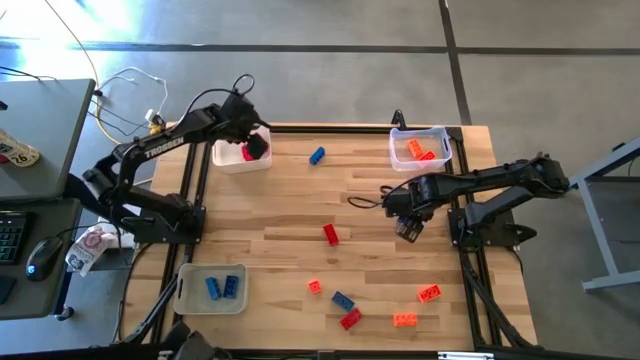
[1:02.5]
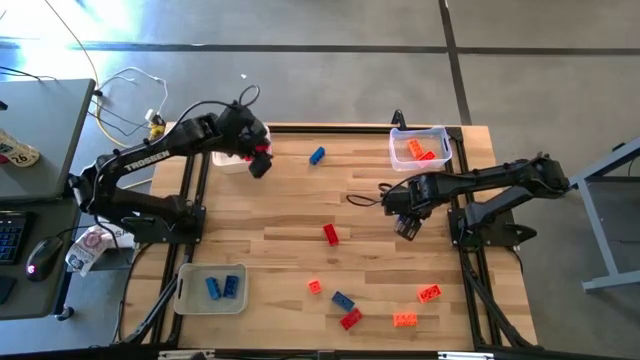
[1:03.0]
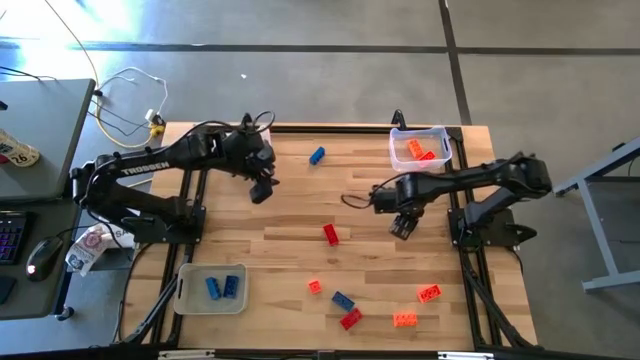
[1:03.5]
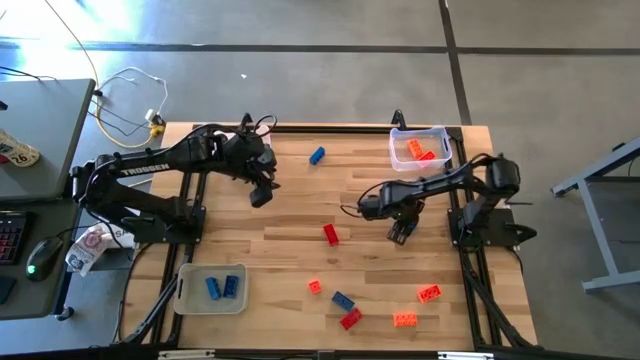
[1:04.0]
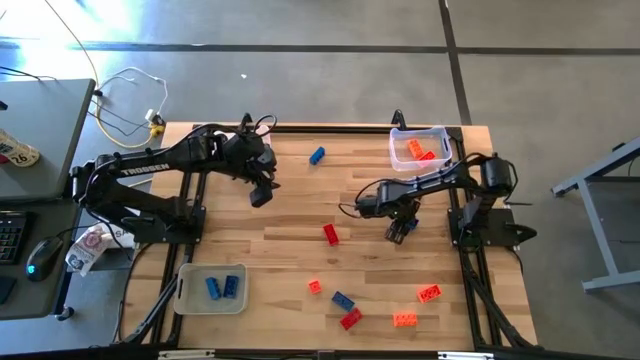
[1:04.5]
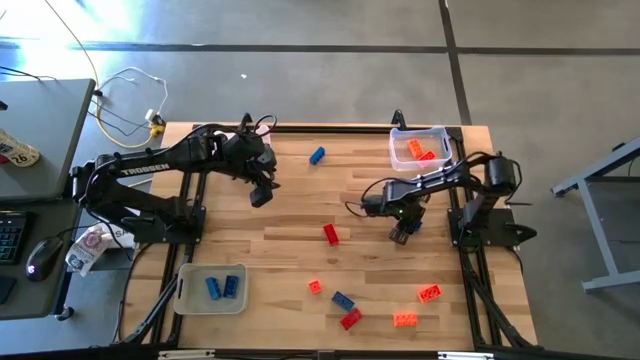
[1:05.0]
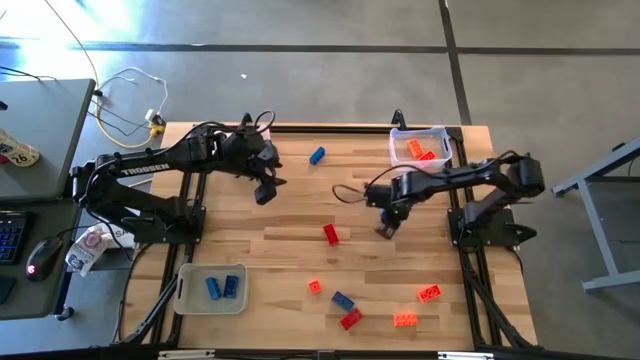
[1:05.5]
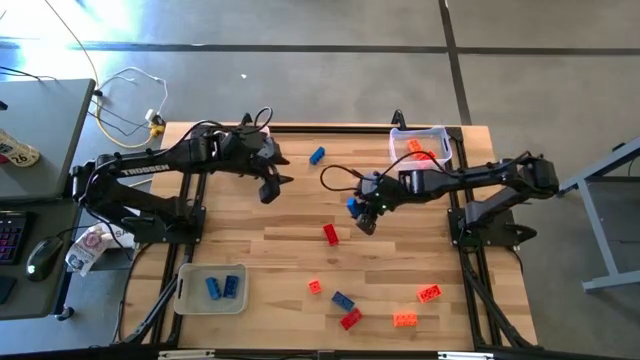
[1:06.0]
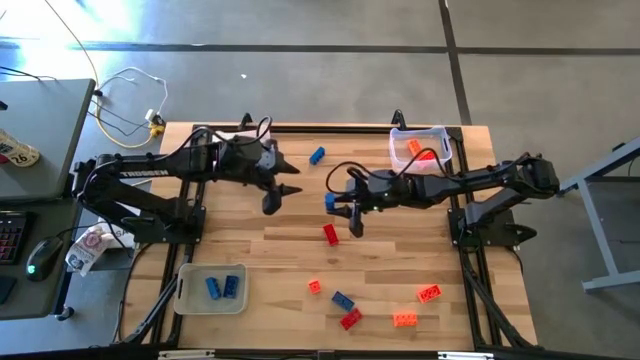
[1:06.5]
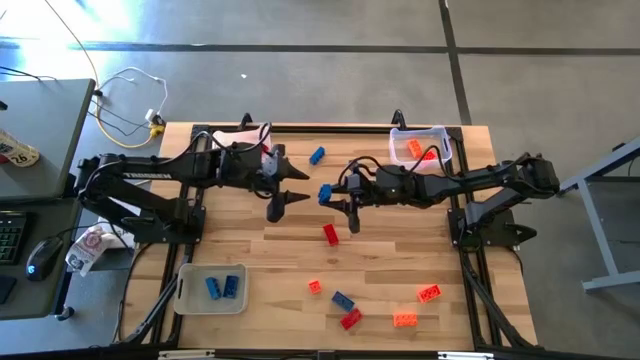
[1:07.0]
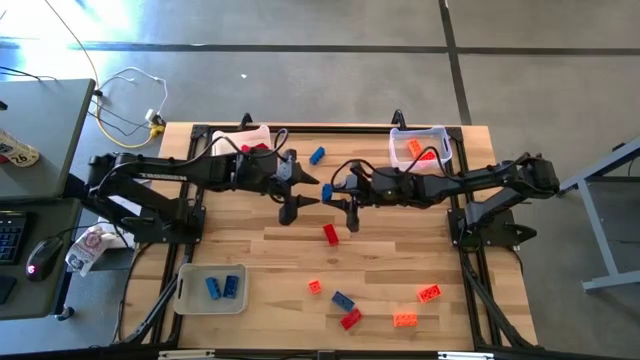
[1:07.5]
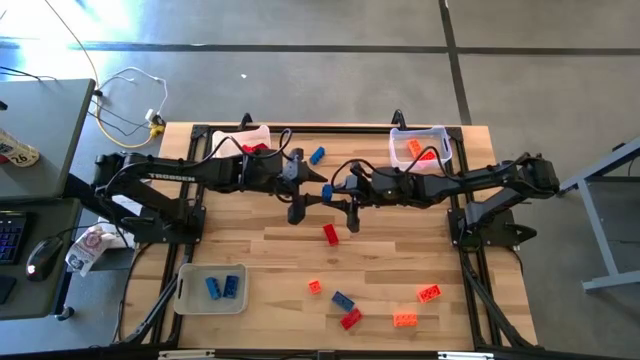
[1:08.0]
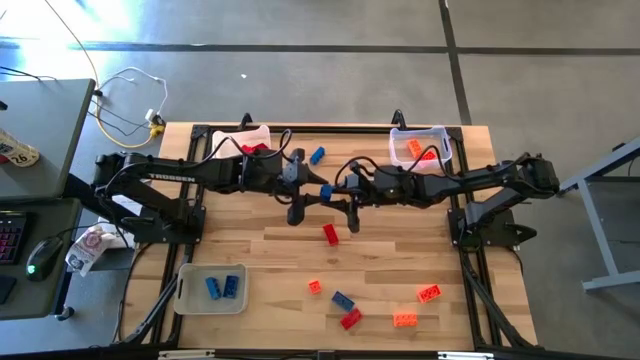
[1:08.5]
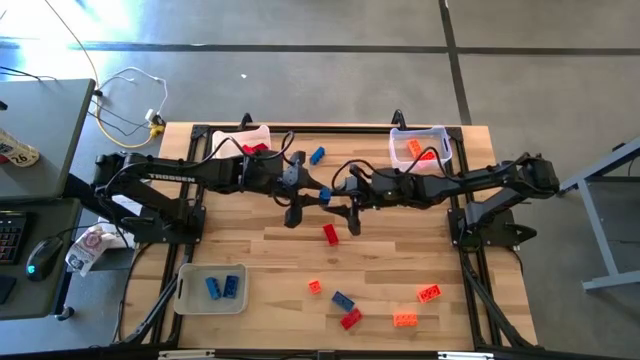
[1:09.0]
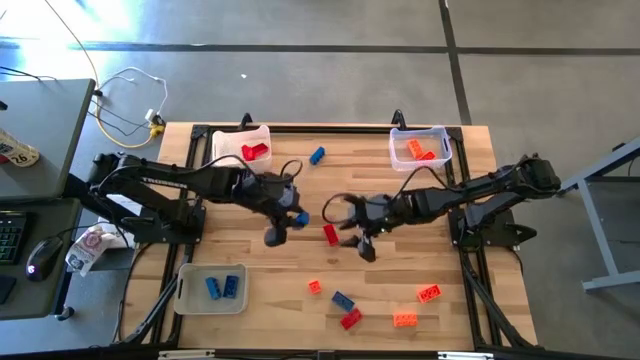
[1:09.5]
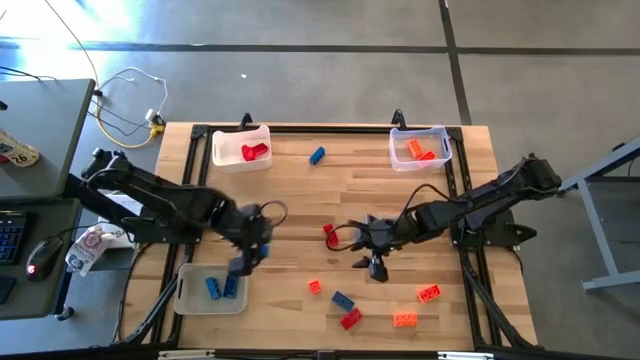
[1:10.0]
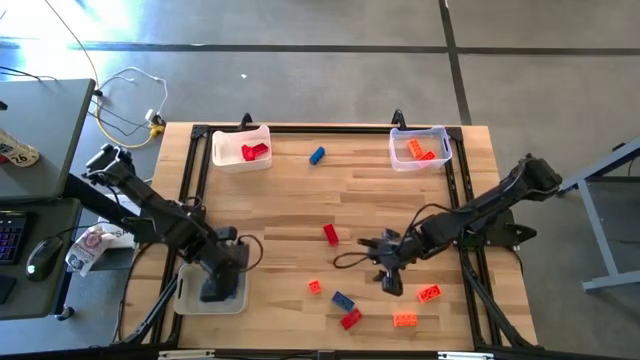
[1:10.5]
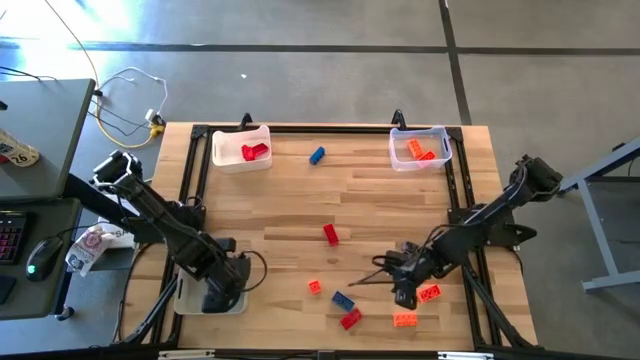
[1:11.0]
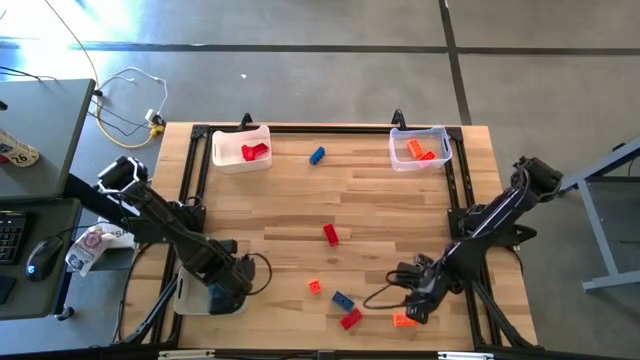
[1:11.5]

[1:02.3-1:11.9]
Task: Sort & place blocks by color
Put the blue game piece into the gray bin

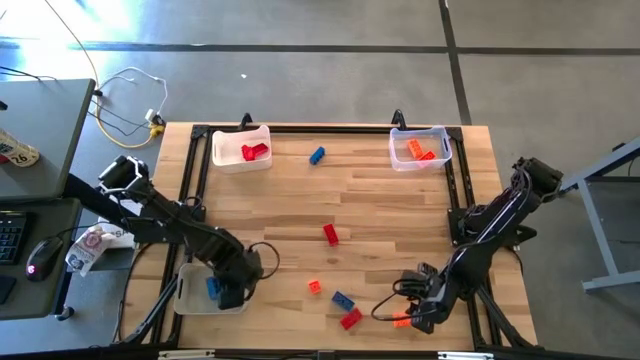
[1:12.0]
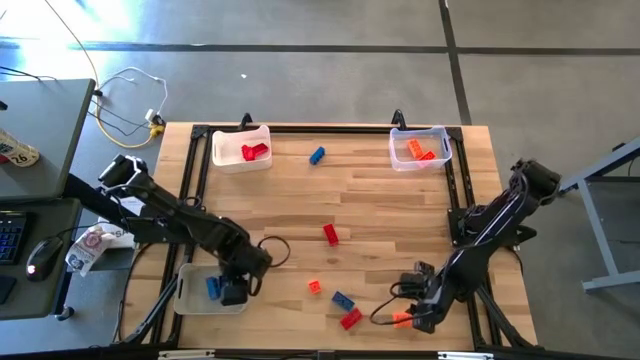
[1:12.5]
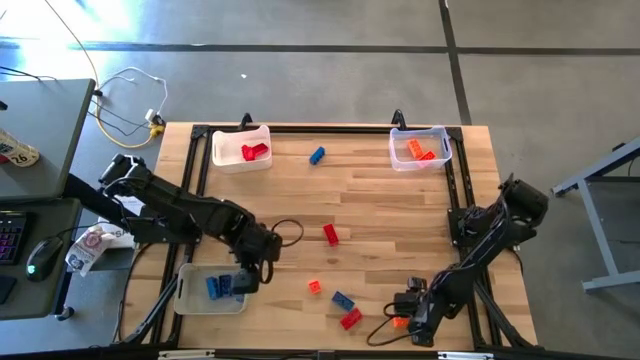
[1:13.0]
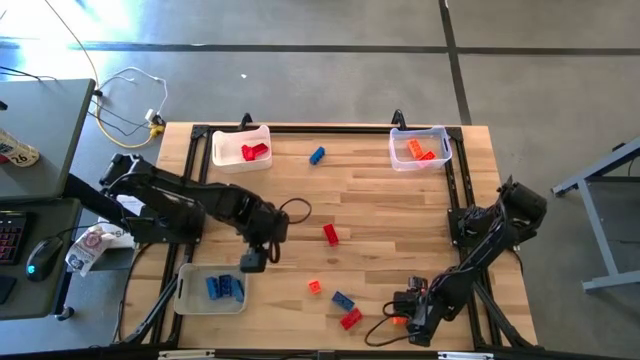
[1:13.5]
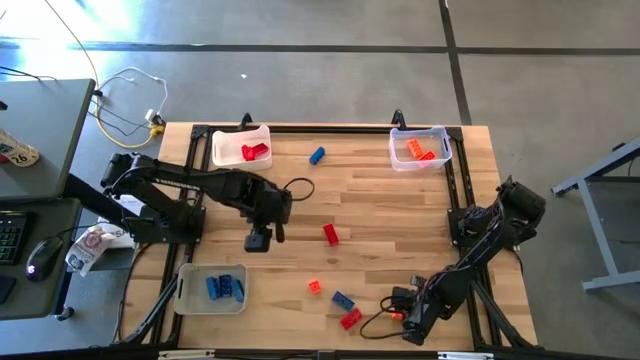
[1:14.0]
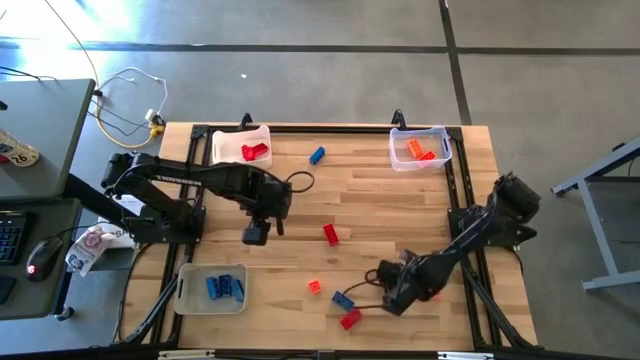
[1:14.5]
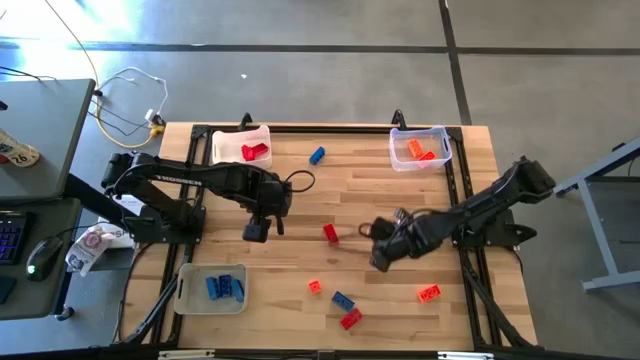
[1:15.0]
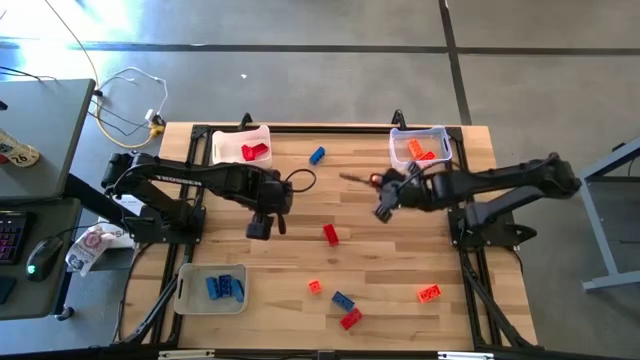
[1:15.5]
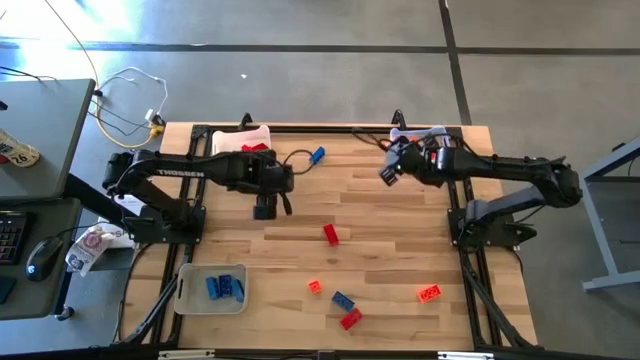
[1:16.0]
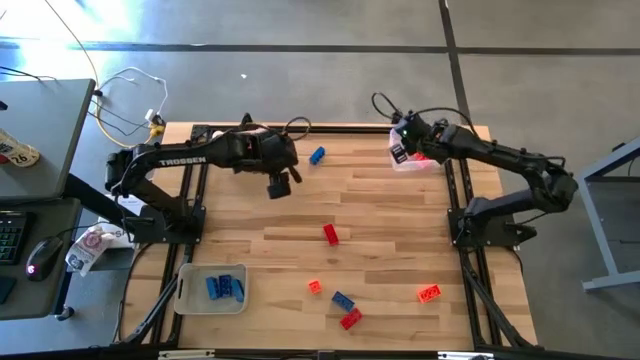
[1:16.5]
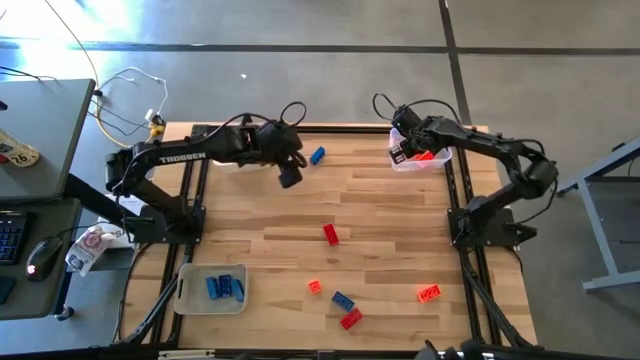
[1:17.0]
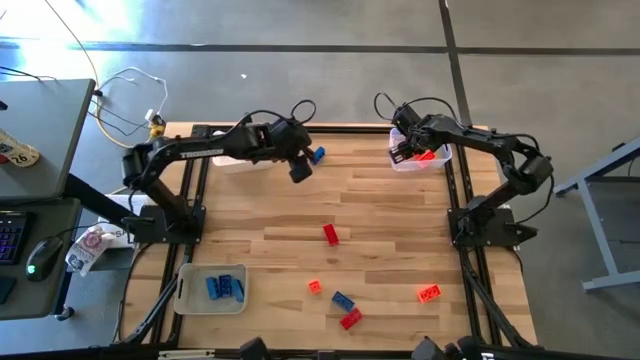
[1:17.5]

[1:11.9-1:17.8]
Put the orange game piece into the transparent bin

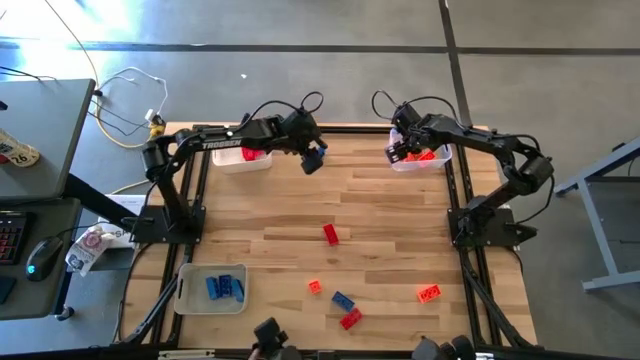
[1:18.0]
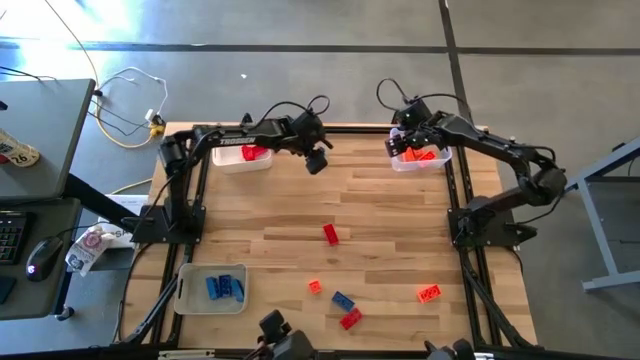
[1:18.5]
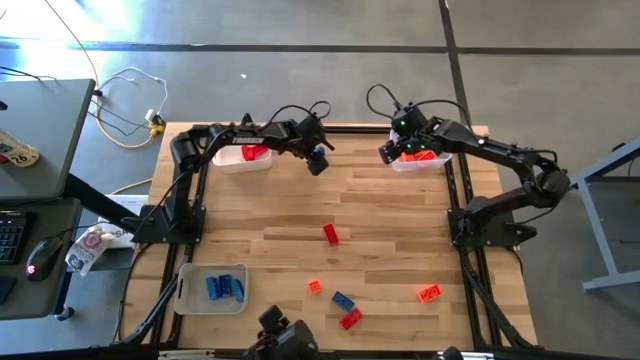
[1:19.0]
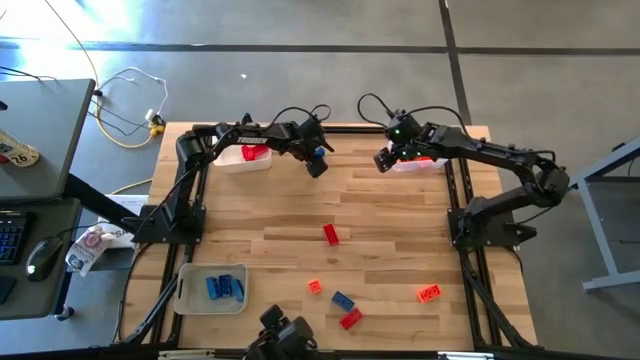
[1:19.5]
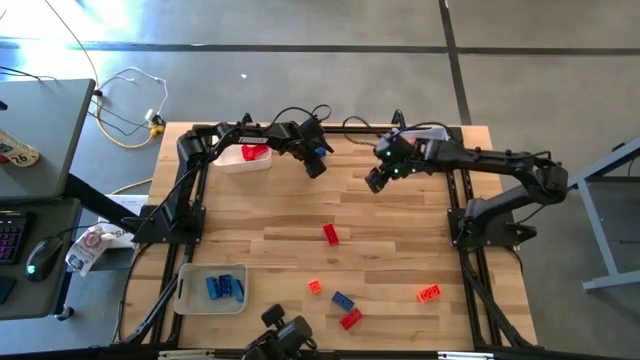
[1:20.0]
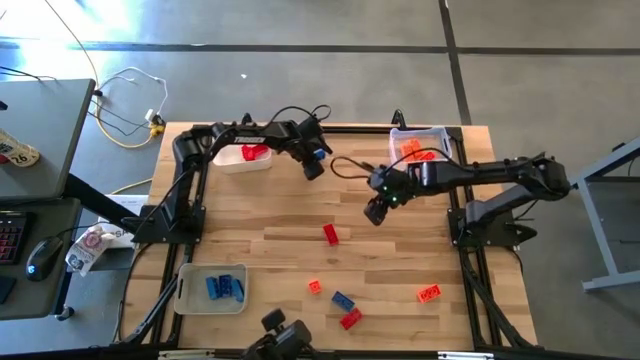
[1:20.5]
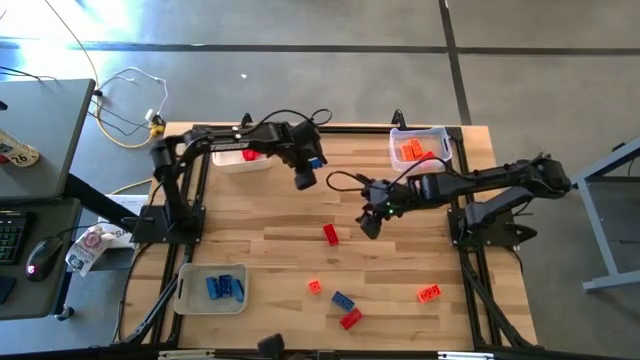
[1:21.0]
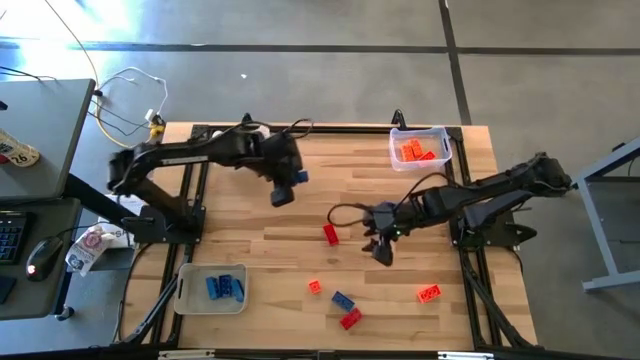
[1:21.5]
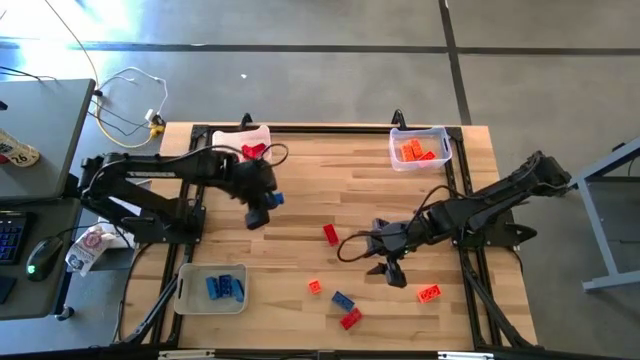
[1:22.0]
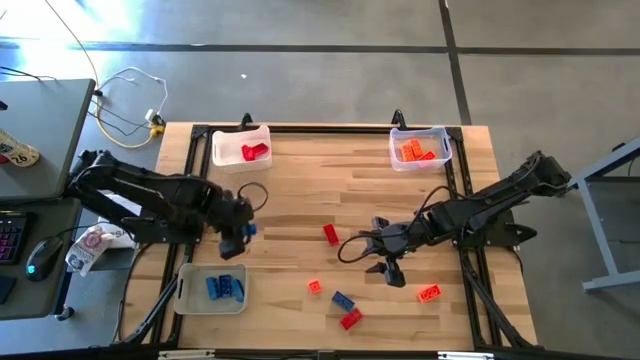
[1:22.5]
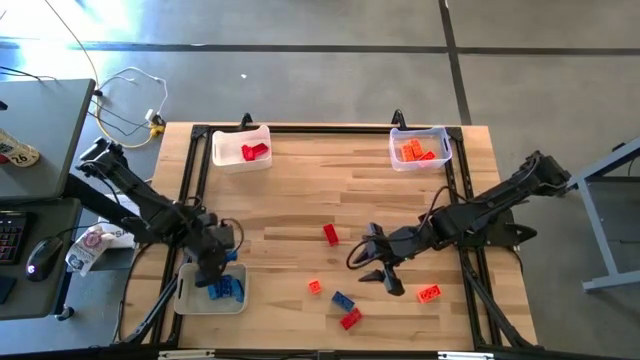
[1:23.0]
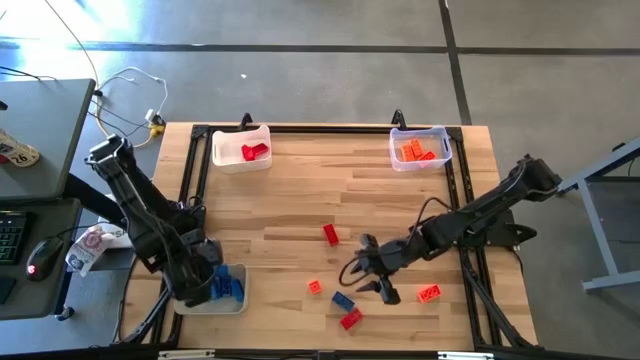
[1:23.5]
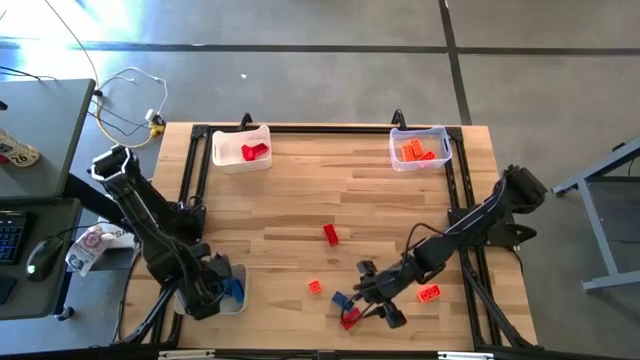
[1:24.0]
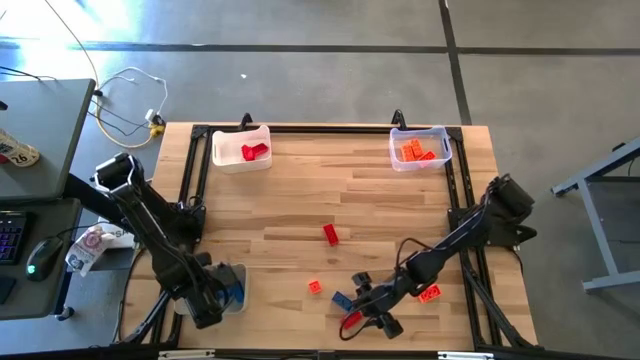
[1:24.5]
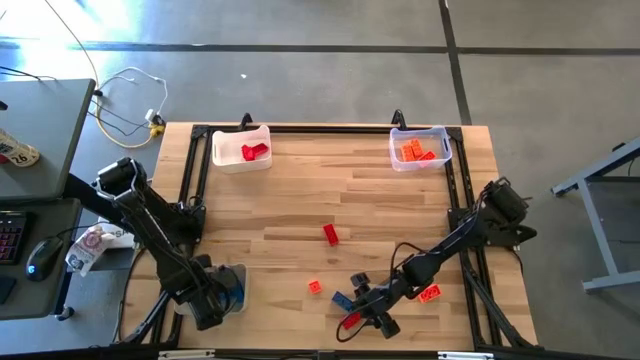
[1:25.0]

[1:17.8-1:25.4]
Put the blue game piece into the gray bin
